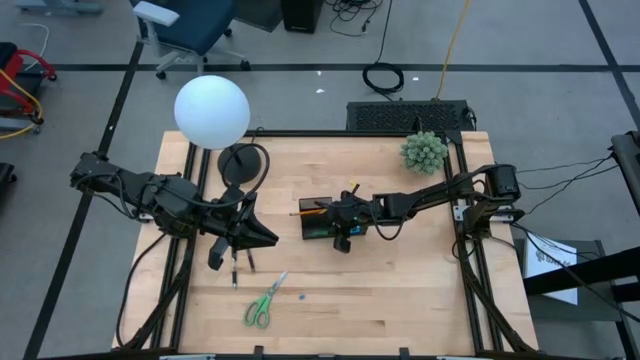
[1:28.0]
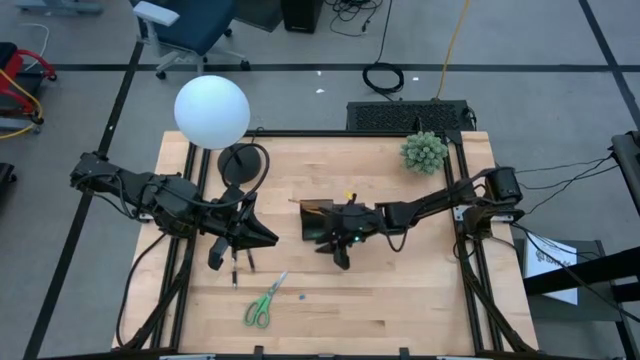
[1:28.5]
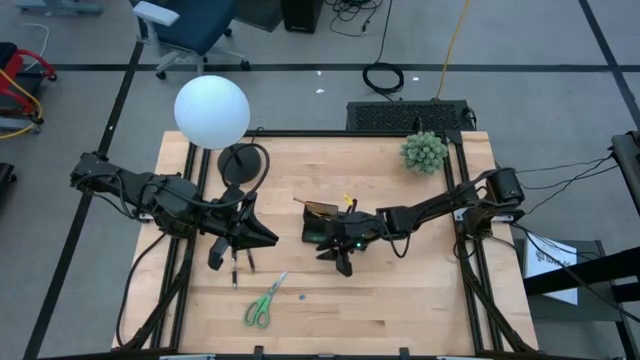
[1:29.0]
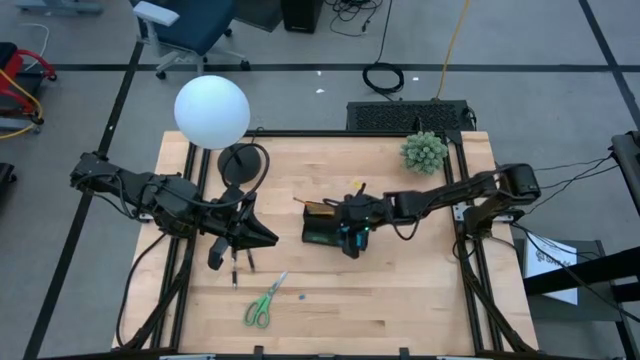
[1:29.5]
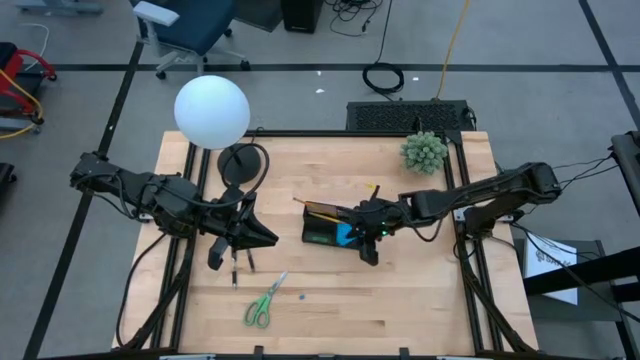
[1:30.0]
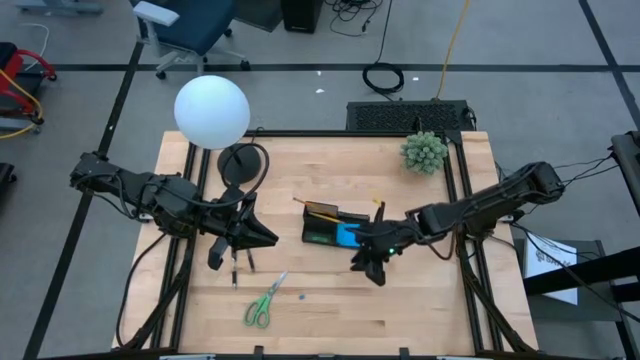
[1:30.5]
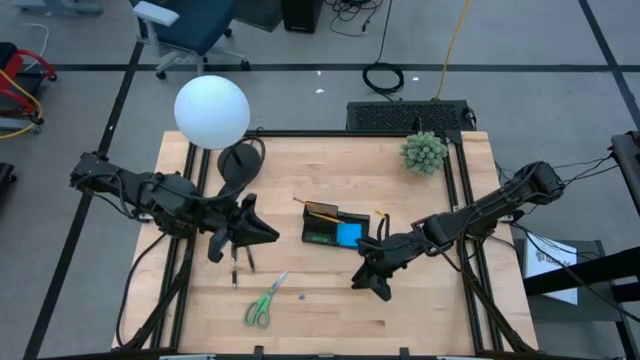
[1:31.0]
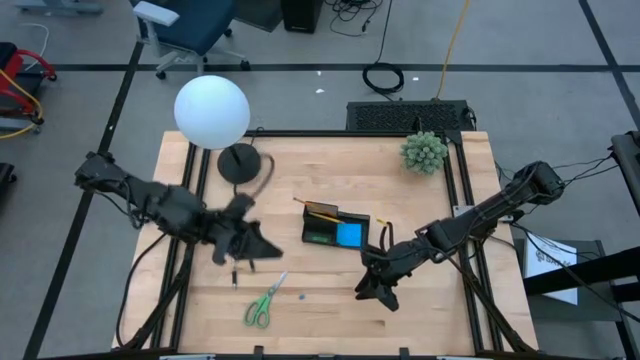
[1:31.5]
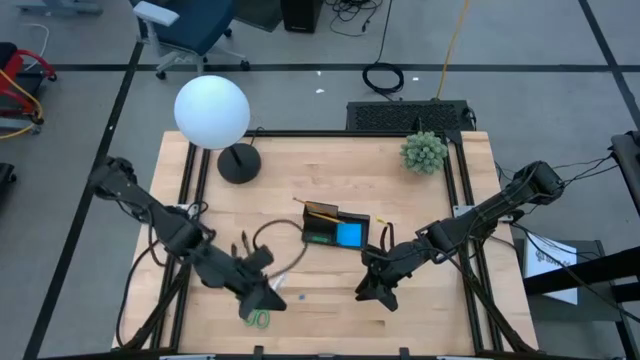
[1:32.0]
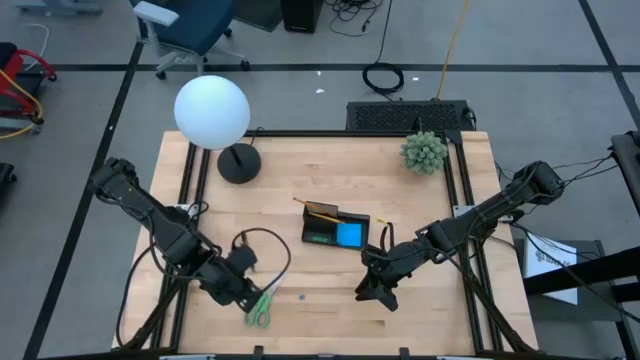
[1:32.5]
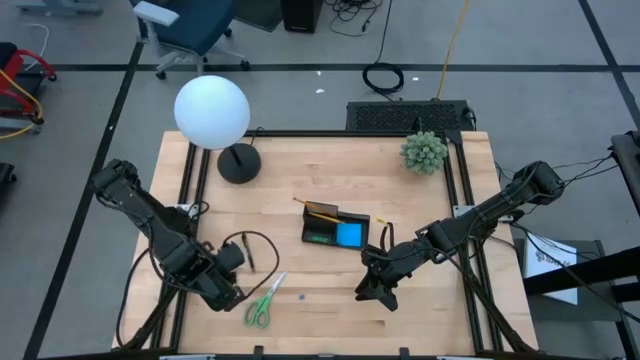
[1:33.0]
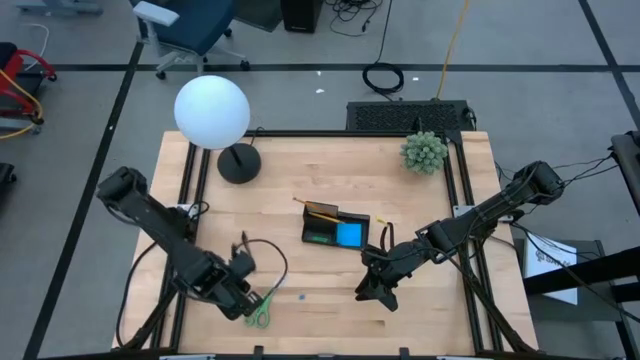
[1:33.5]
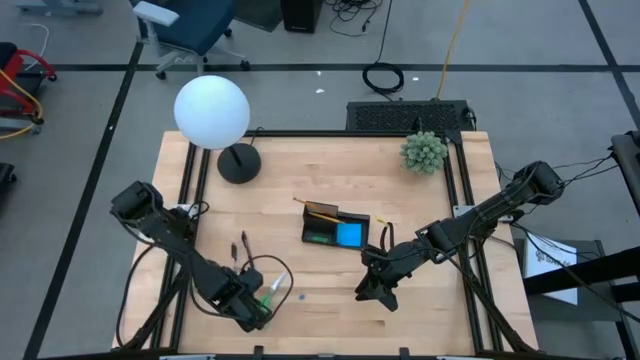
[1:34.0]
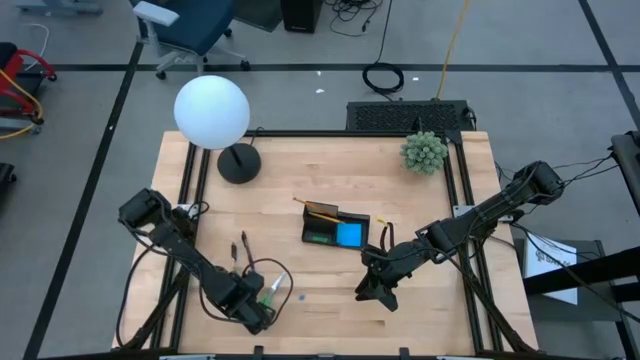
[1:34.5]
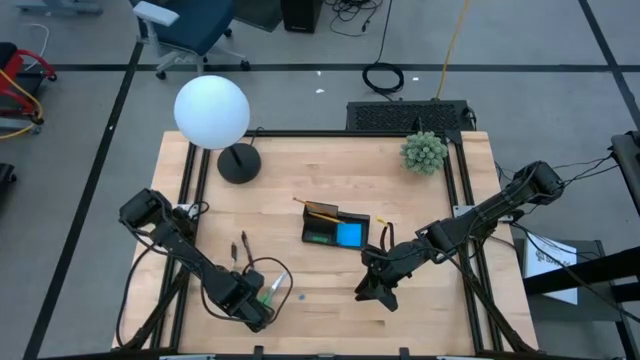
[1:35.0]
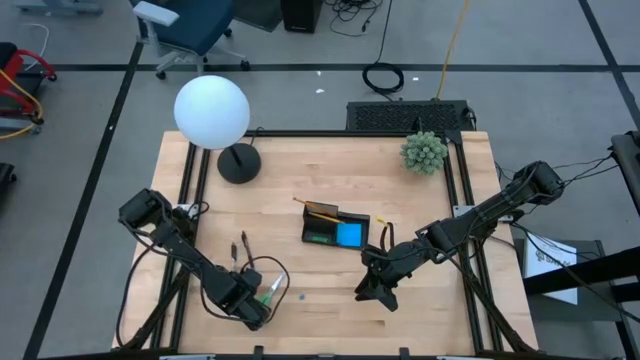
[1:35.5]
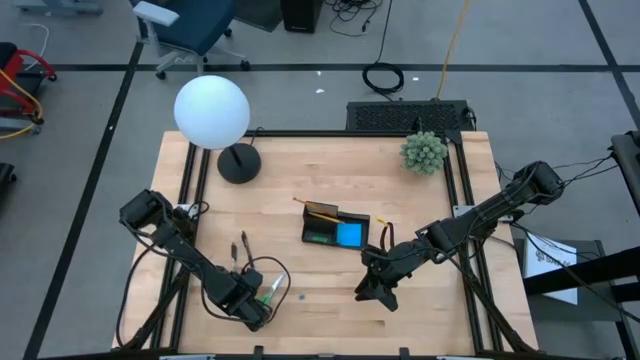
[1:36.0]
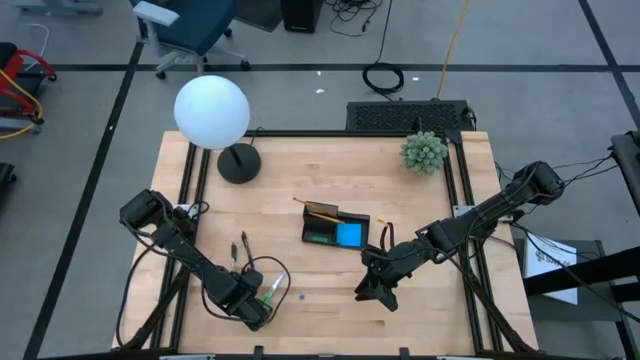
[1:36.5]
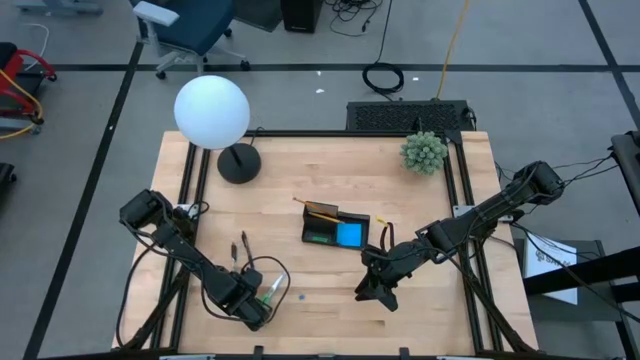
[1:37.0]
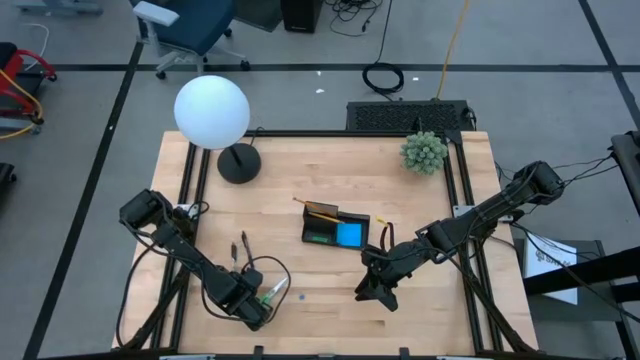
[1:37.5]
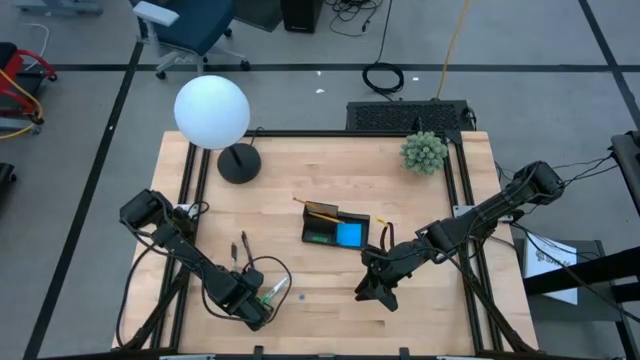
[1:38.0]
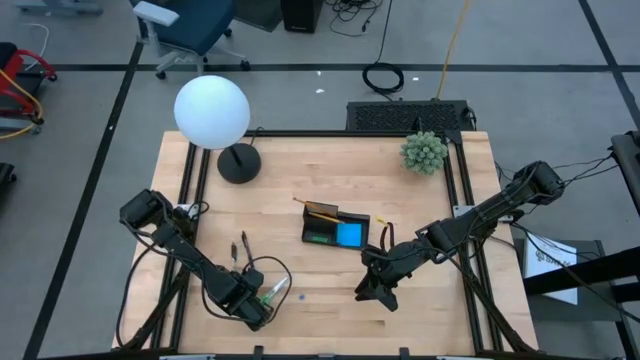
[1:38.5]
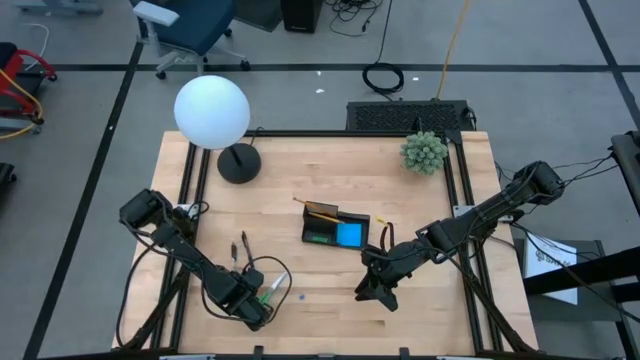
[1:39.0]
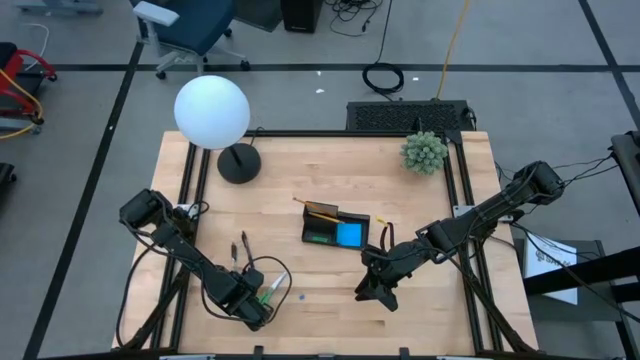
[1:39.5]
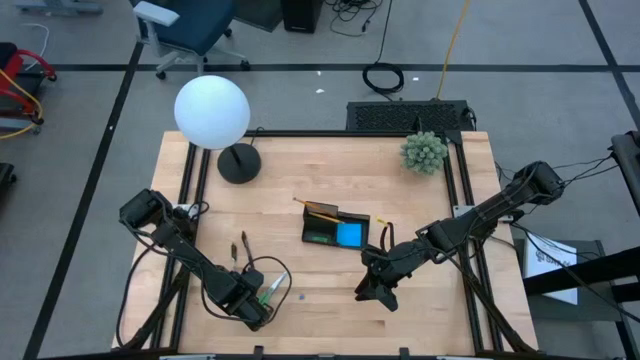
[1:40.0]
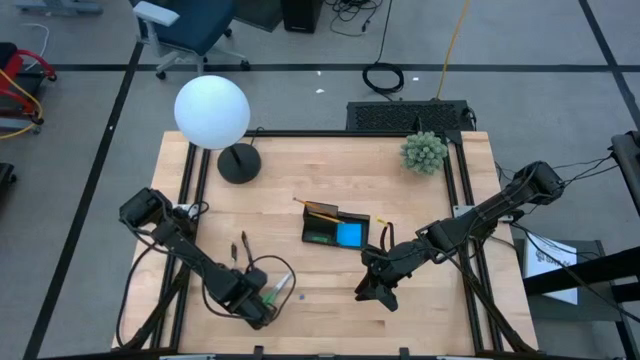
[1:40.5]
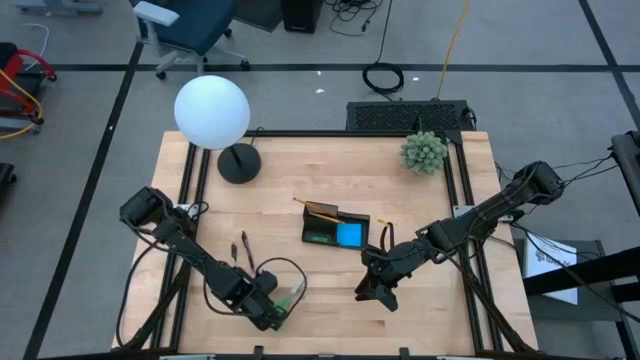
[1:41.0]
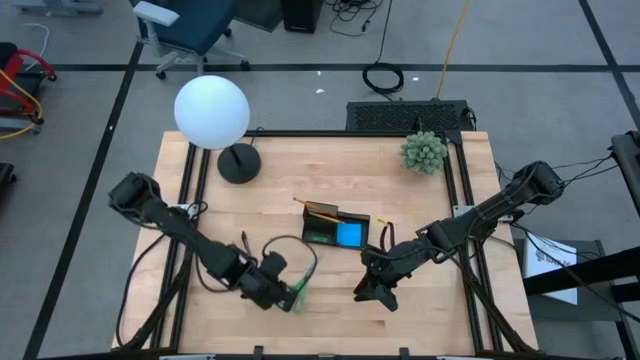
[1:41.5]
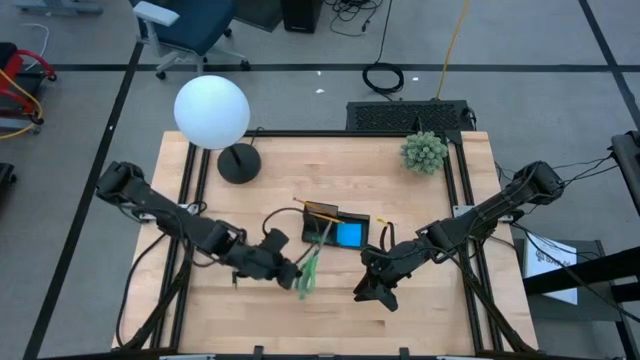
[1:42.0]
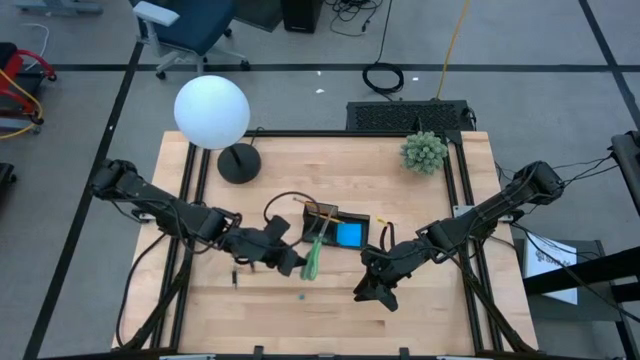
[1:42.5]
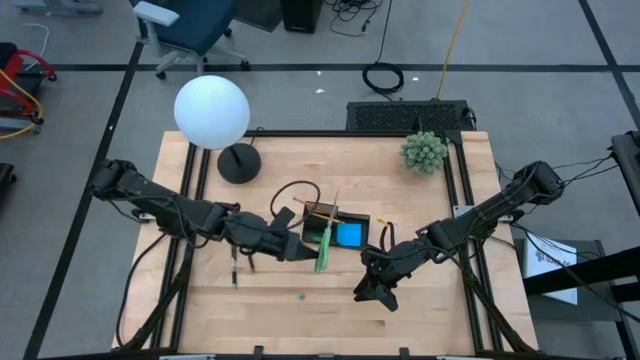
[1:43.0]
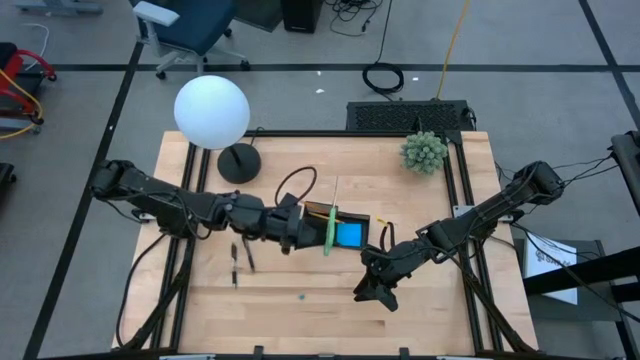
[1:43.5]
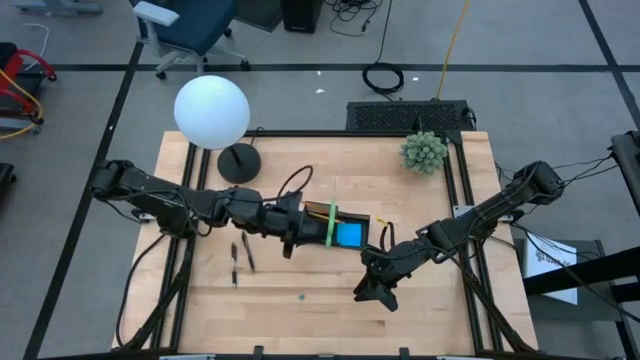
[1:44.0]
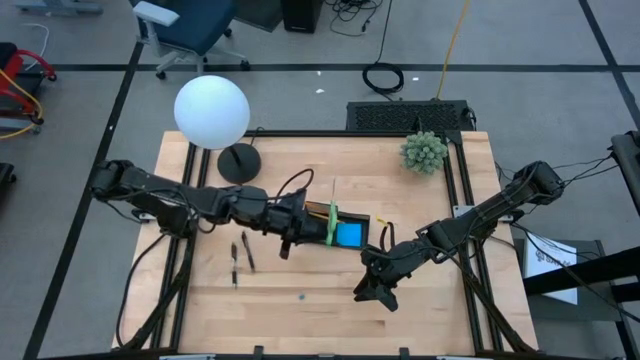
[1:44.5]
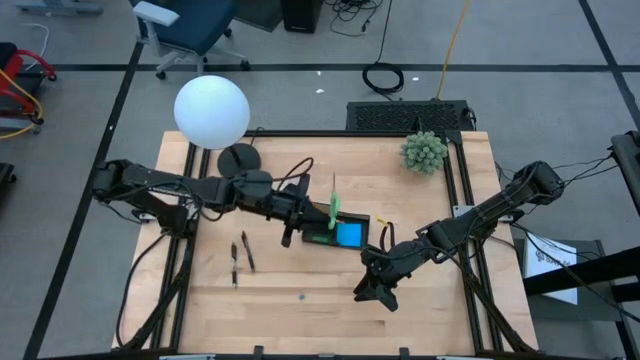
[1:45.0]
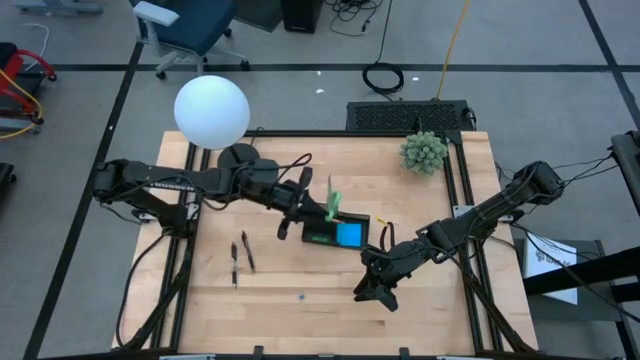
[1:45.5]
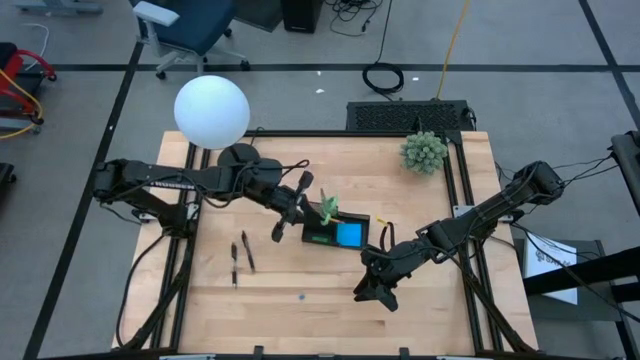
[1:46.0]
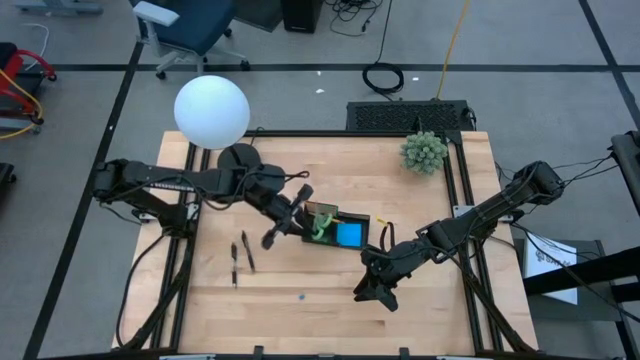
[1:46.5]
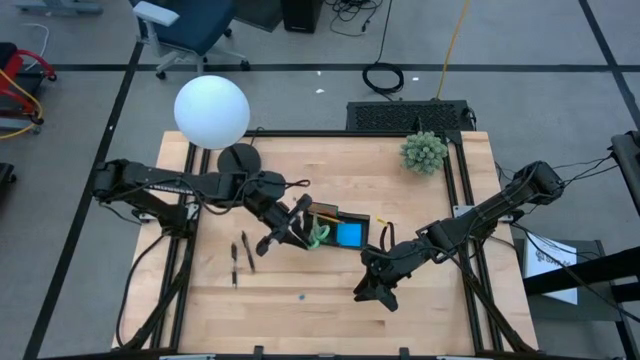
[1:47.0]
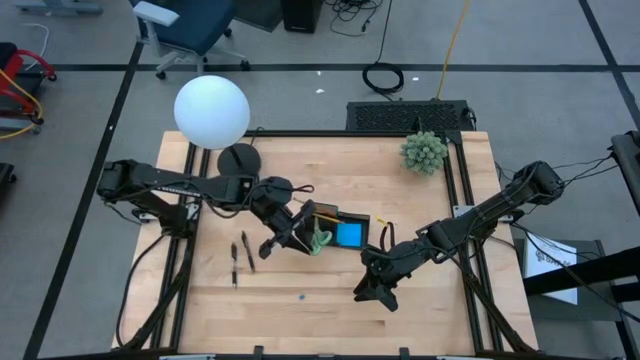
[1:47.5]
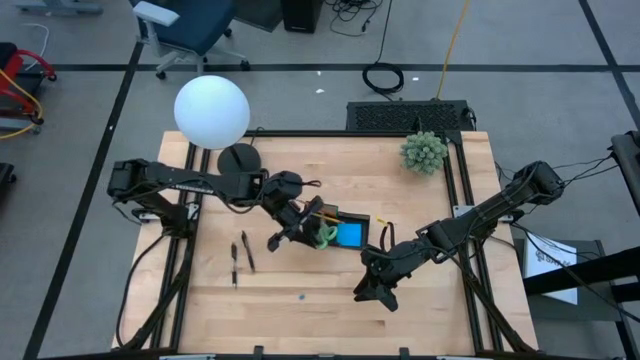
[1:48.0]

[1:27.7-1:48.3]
Task: Pick and place office supplies into organizer
Put the green scissors into the desk organizer

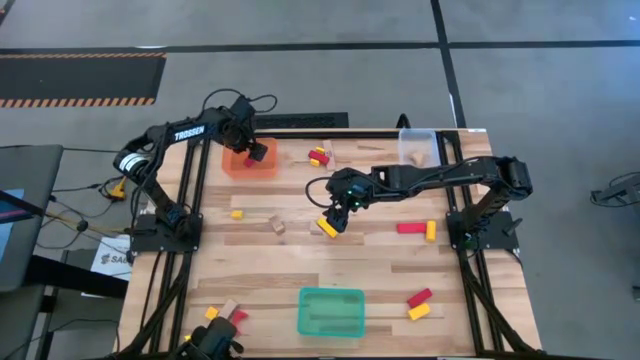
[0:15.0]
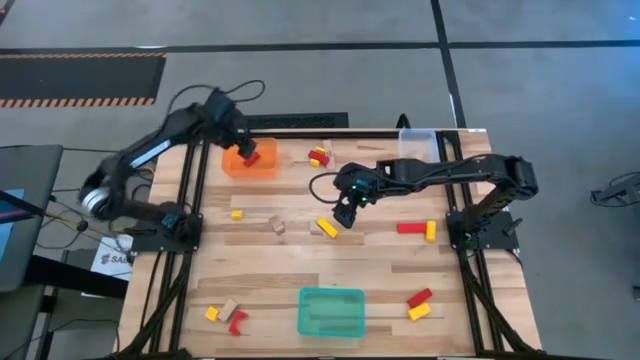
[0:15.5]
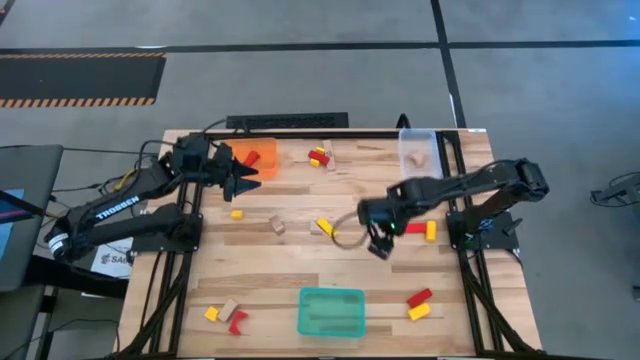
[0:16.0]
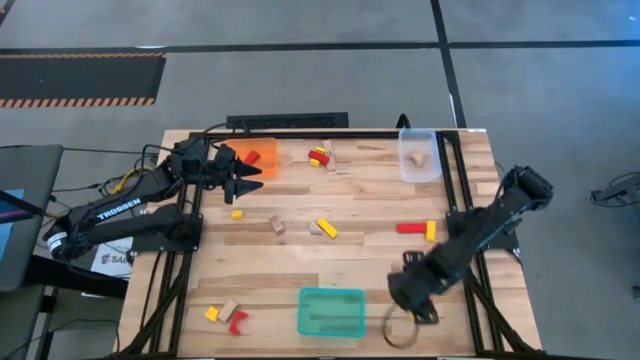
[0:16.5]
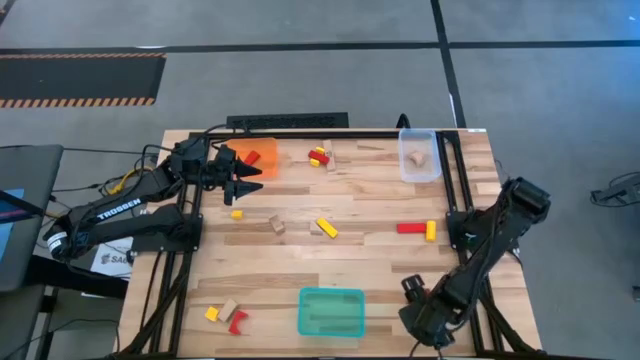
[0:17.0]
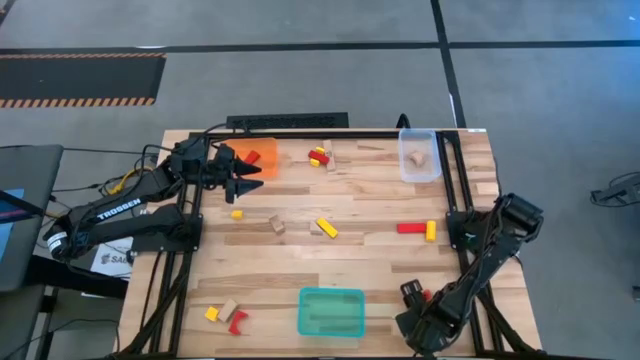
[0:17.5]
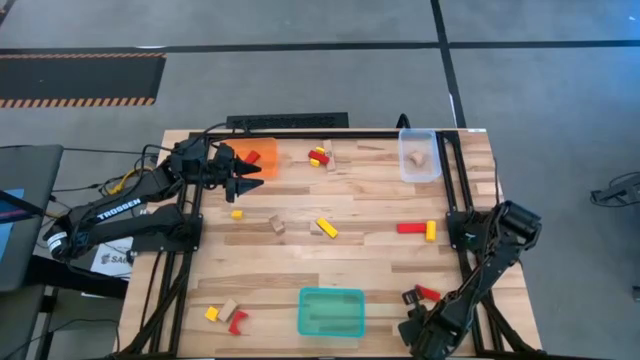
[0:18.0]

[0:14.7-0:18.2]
Task: Sort & place blocks by color
Put the yellow block into the blue bin
